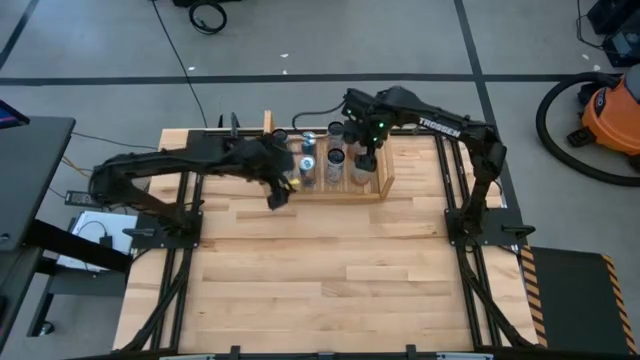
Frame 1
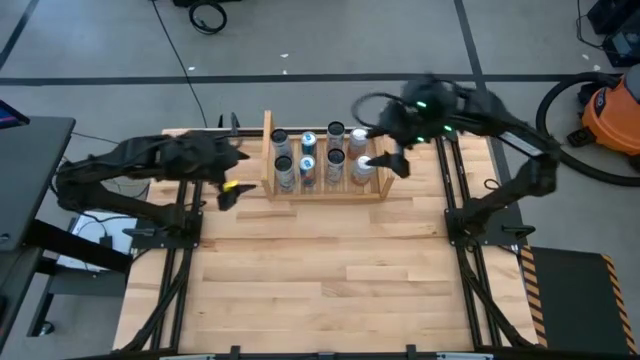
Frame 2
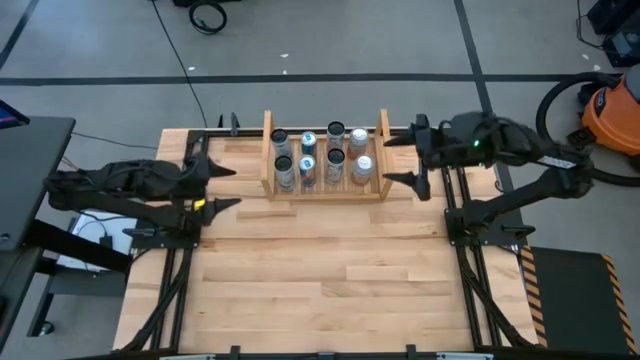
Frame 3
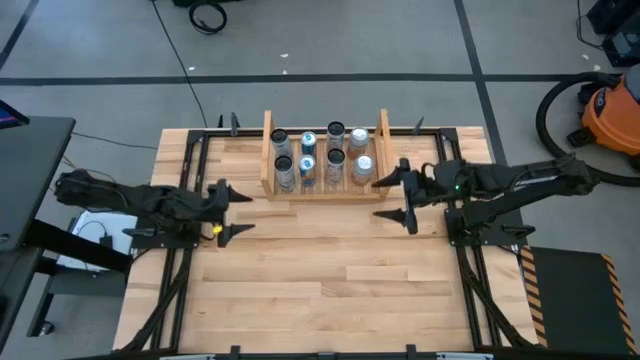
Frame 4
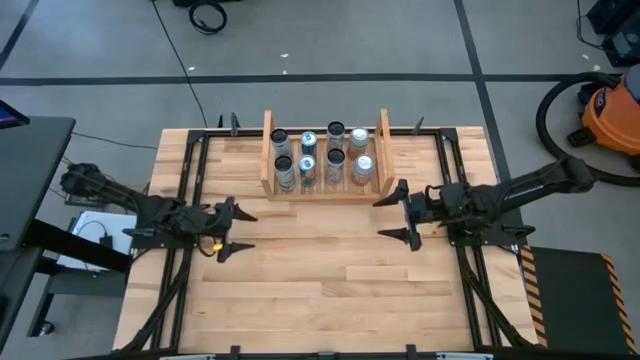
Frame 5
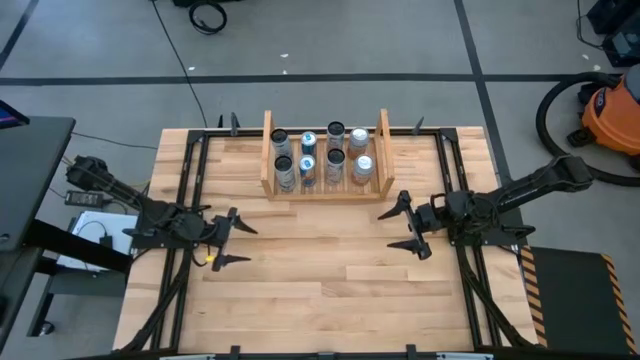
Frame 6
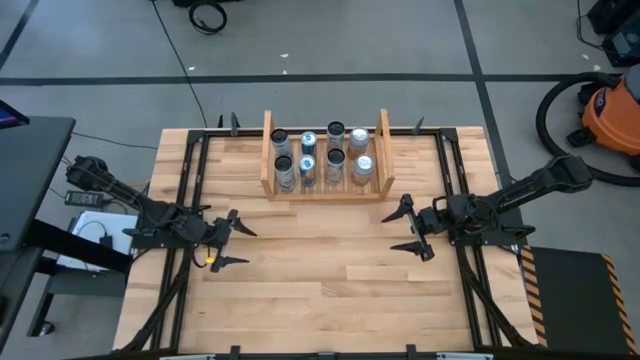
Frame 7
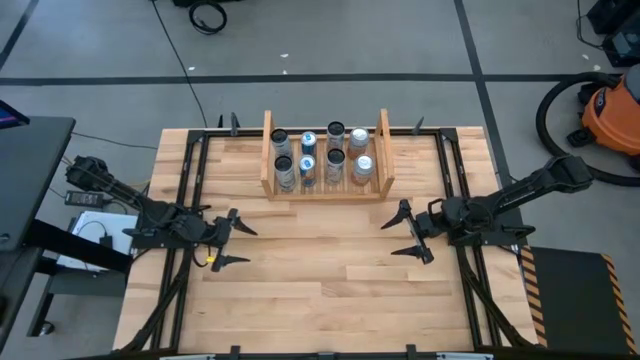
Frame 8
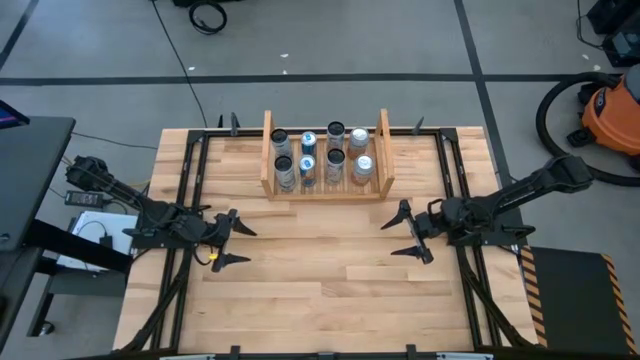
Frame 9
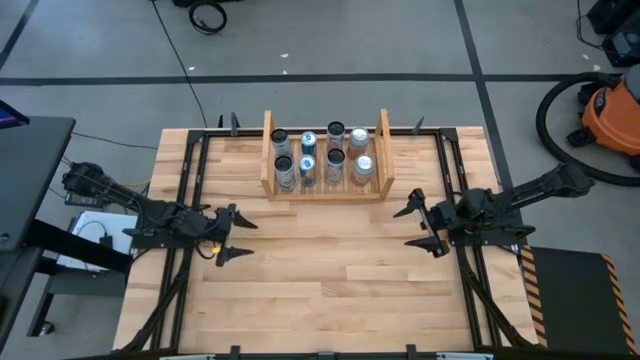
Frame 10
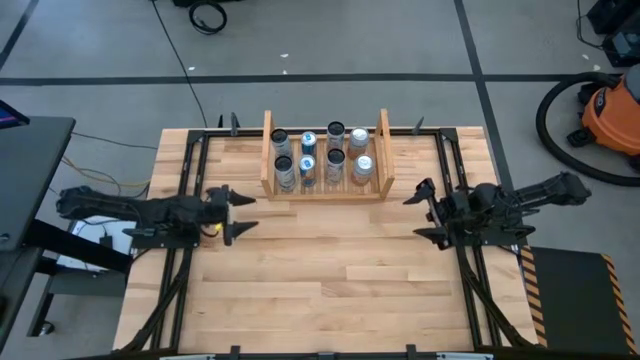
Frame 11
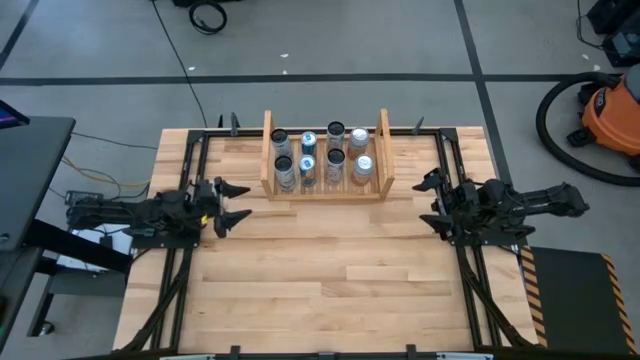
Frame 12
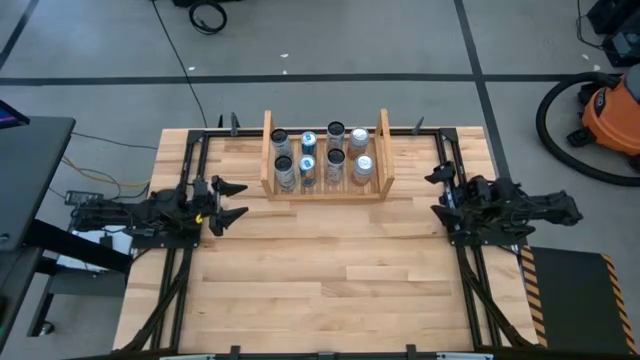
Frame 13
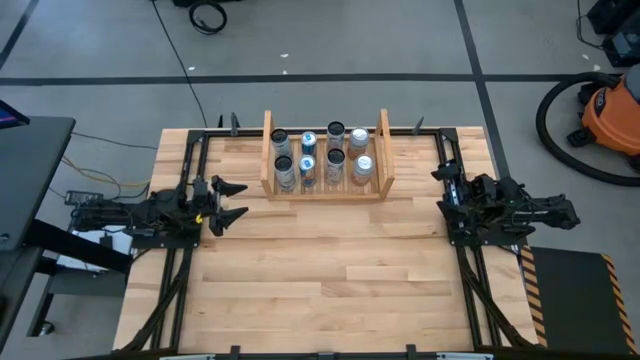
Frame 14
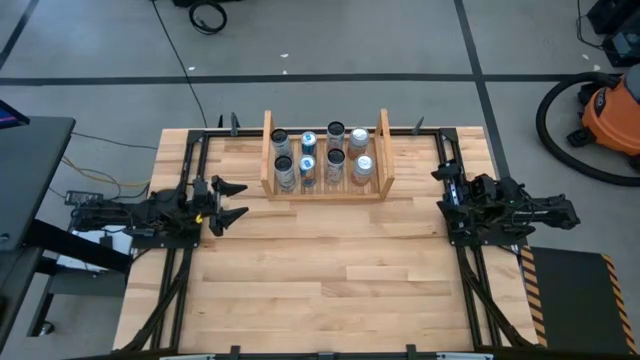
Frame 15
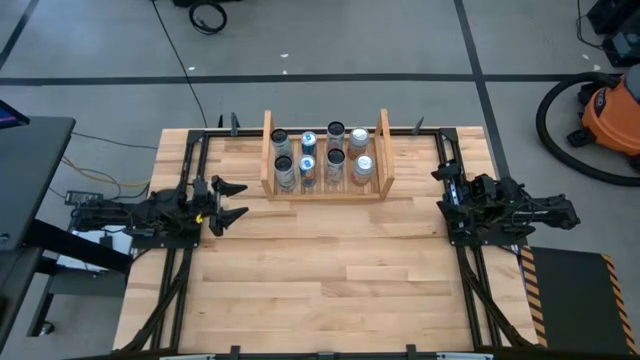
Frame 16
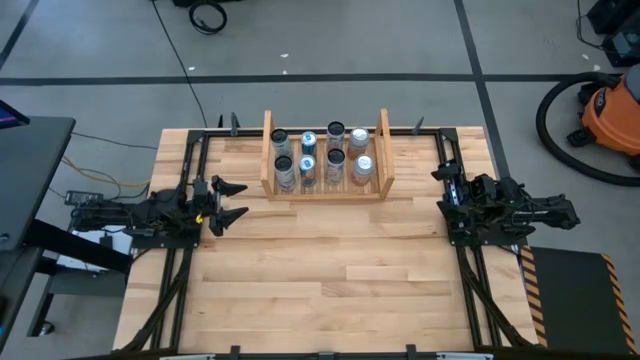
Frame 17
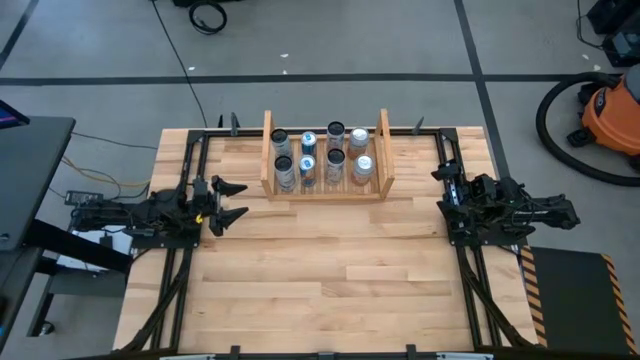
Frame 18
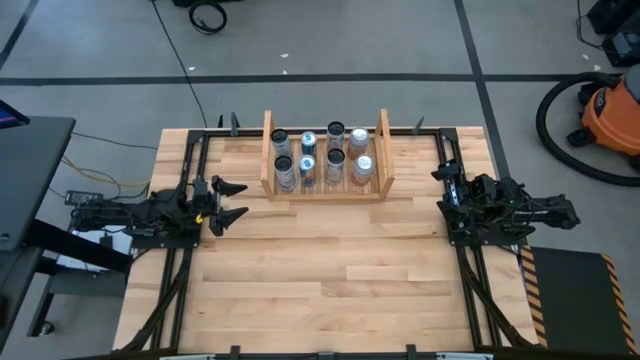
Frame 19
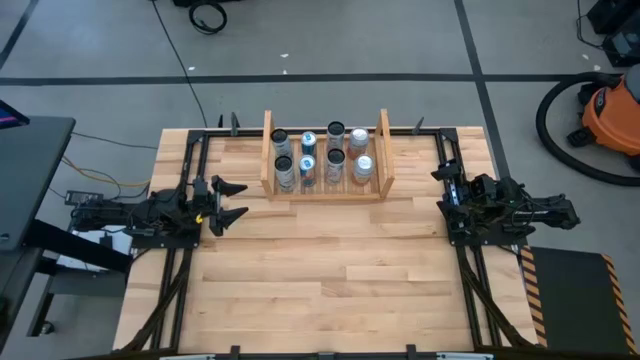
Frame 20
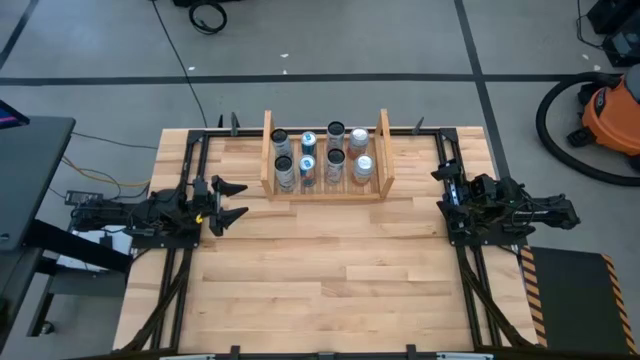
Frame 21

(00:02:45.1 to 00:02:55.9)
Task: Place canned beverage on shelf
Return to Home Position

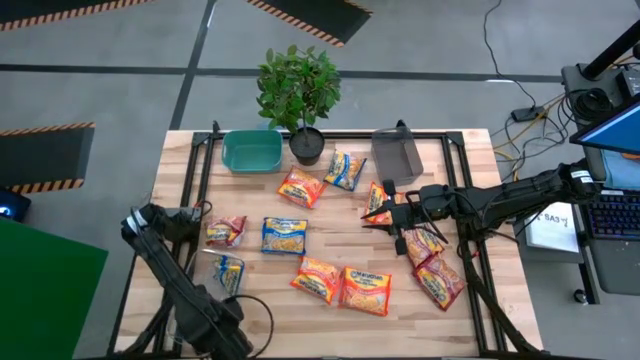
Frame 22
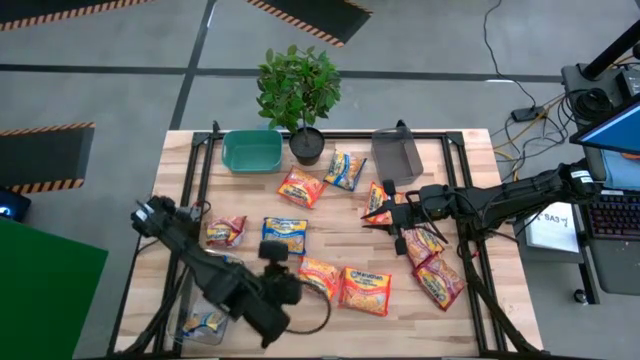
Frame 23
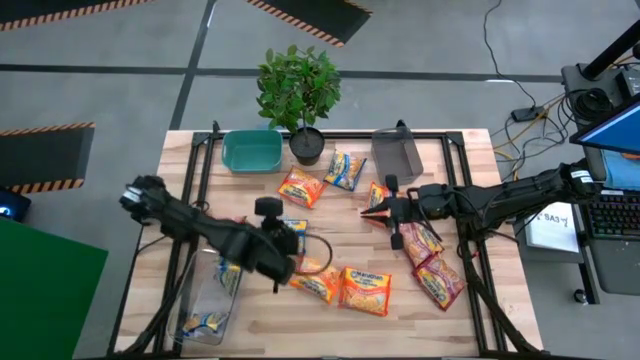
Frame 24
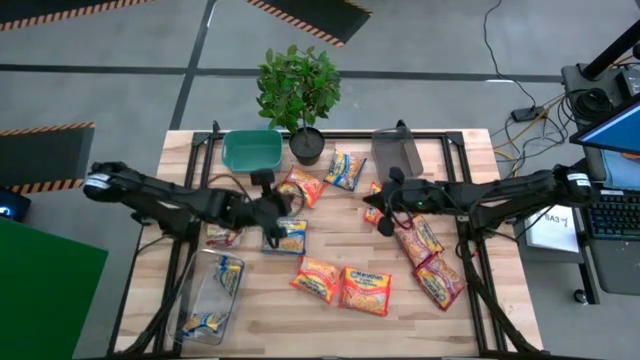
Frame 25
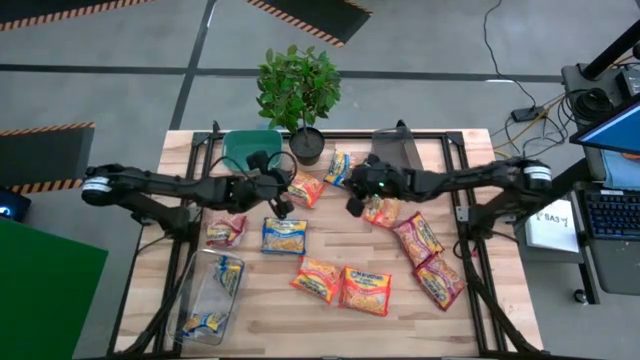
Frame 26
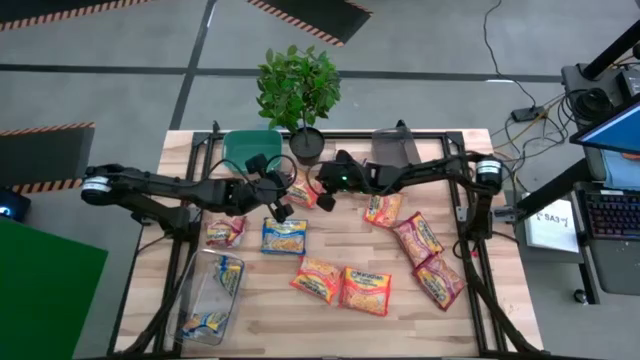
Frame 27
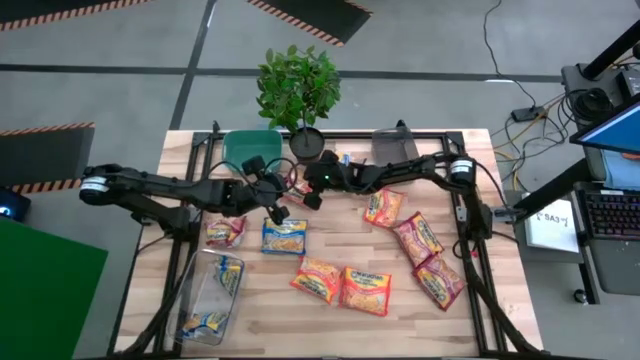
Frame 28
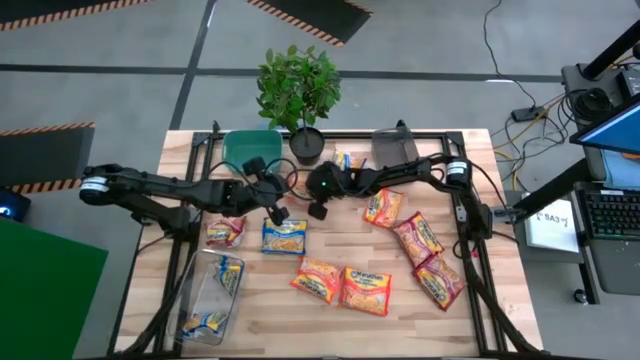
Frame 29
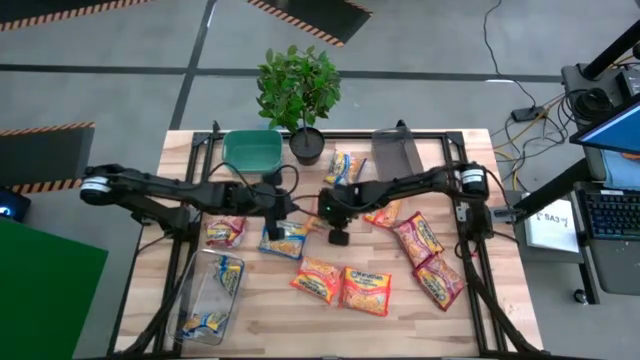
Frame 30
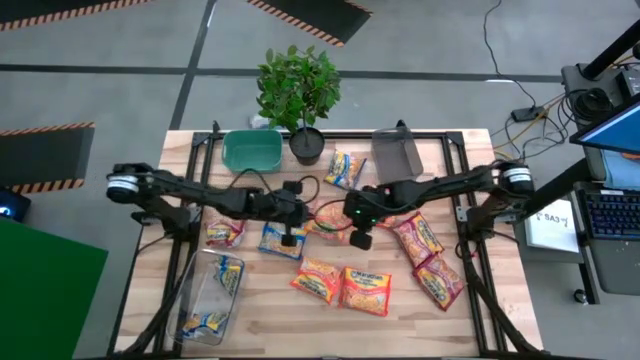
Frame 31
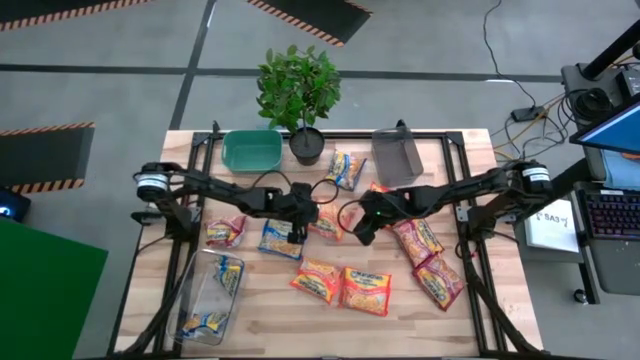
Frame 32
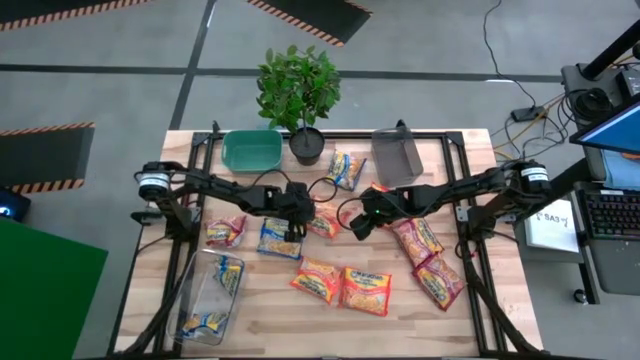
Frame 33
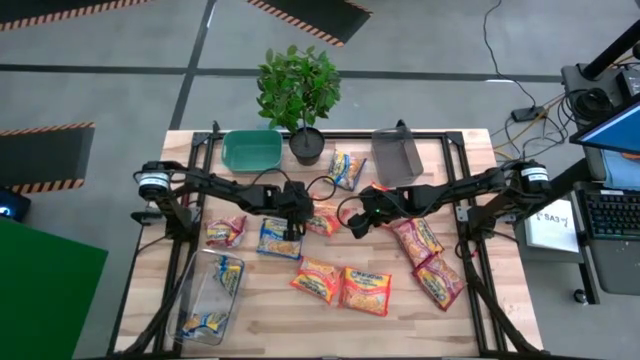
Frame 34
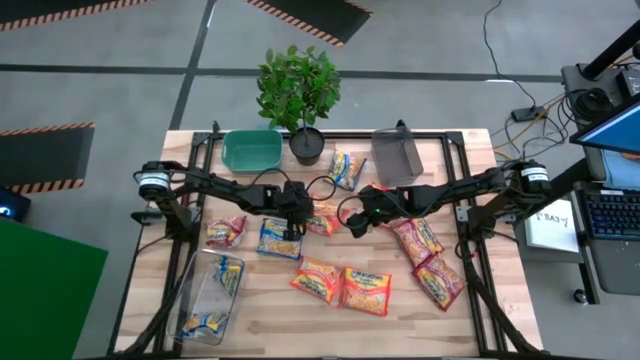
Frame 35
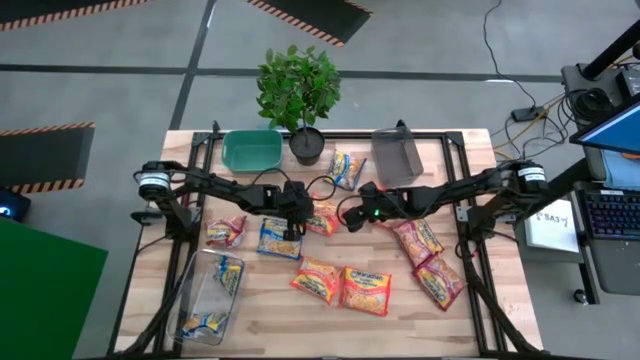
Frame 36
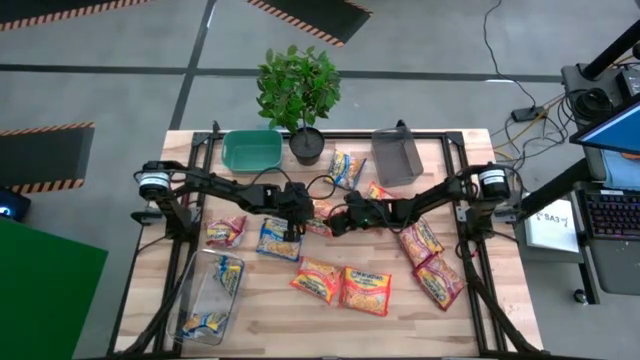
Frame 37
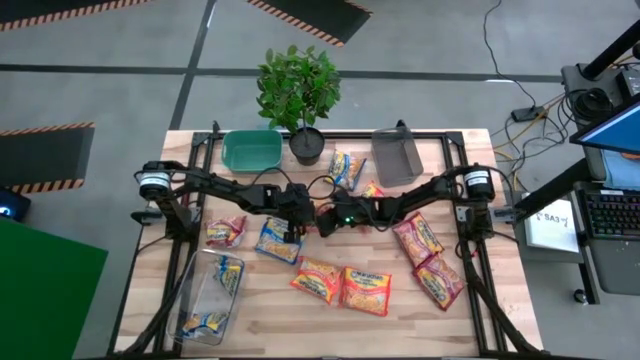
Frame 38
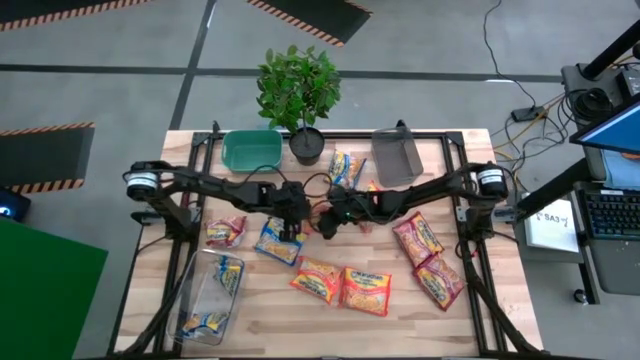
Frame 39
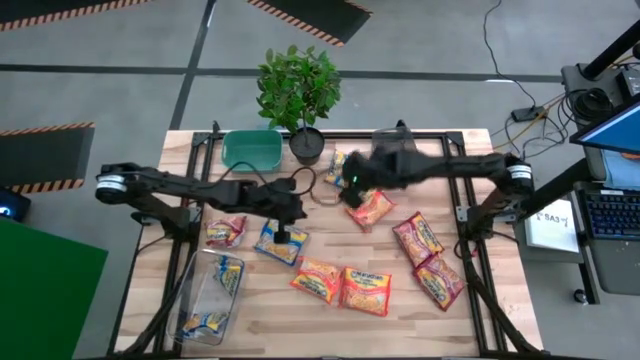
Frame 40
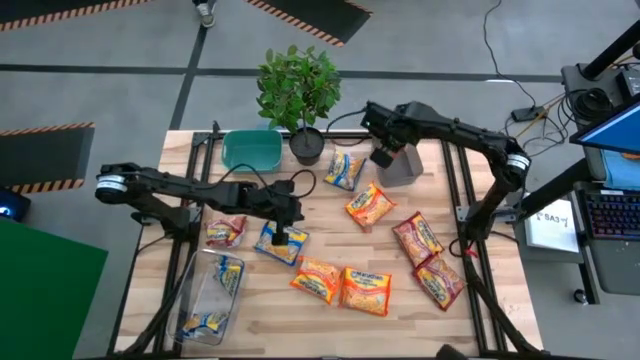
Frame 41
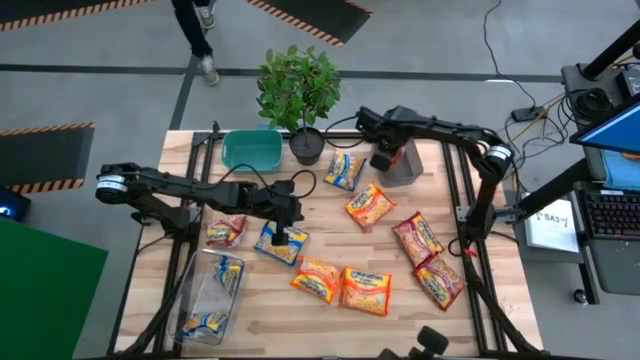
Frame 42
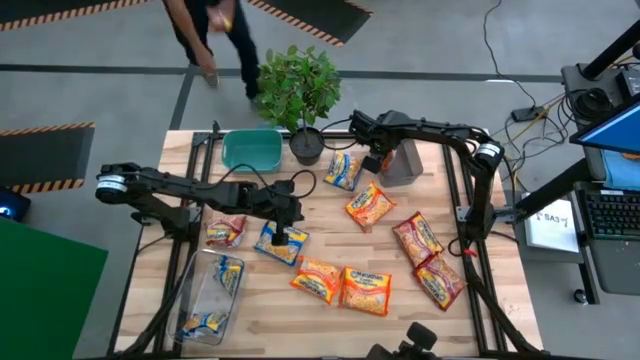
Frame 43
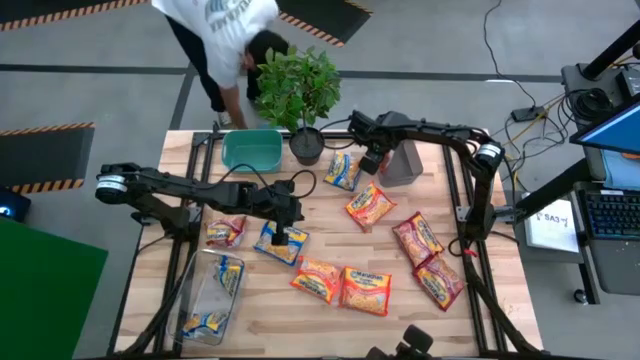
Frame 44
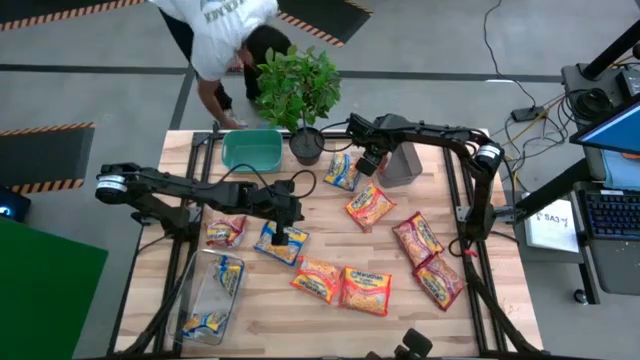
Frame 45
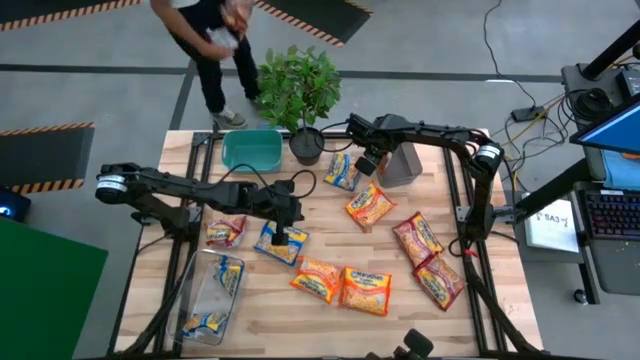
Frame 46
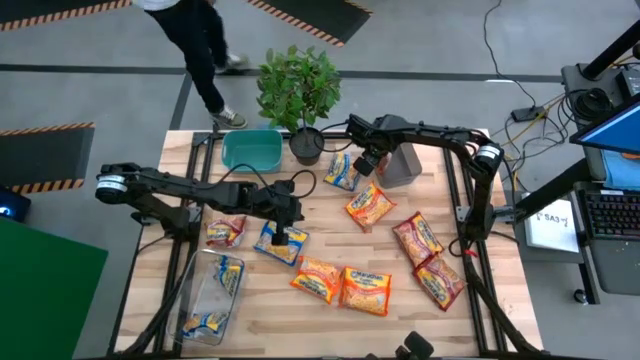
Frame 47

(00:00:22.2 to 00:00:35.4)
Task: Sort Maruchan noodles
Put the orange noodle pack into the black bin
